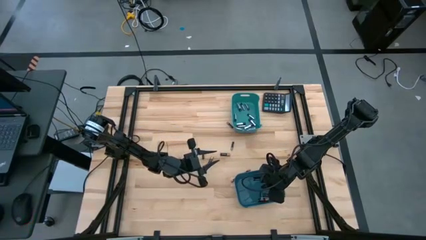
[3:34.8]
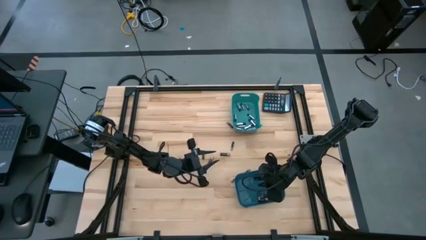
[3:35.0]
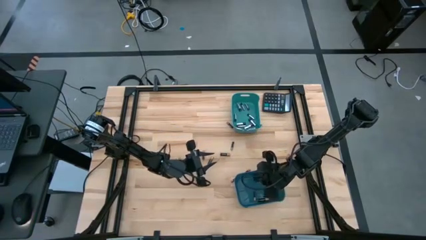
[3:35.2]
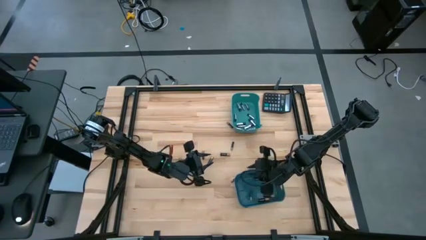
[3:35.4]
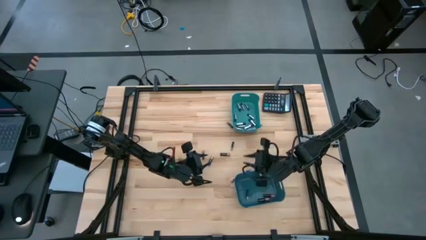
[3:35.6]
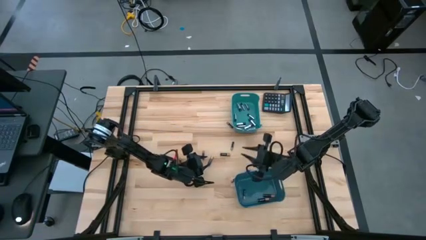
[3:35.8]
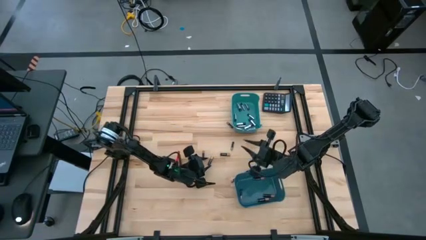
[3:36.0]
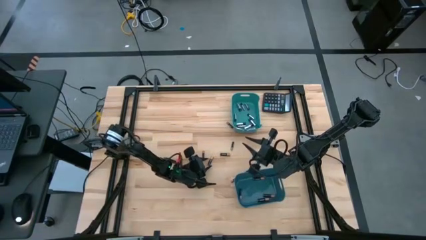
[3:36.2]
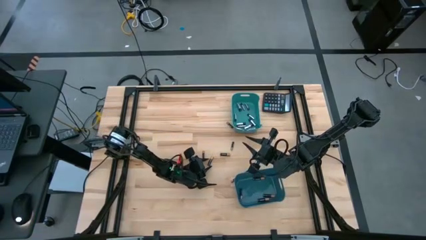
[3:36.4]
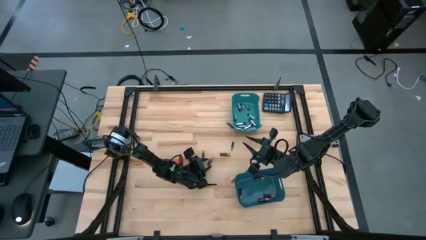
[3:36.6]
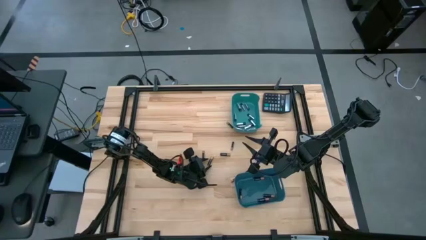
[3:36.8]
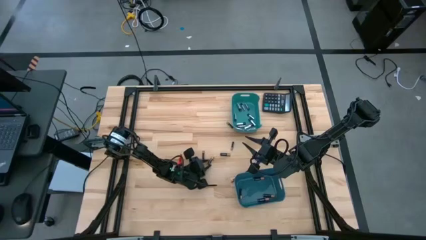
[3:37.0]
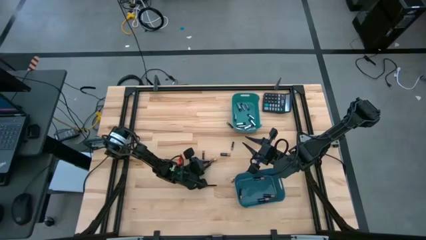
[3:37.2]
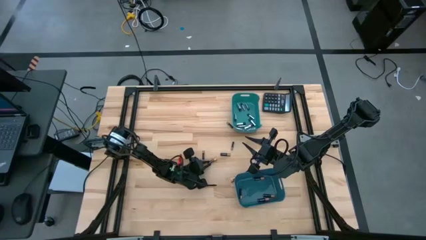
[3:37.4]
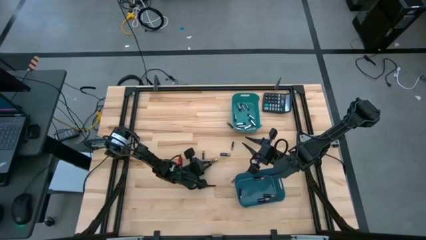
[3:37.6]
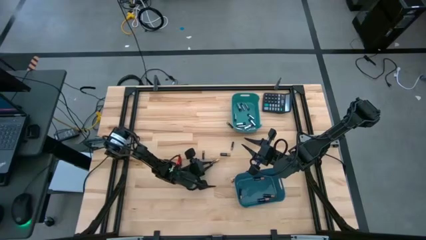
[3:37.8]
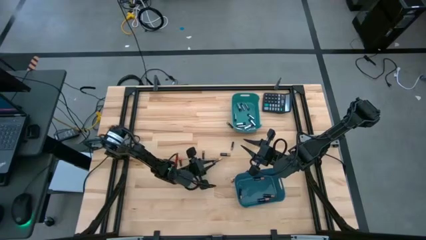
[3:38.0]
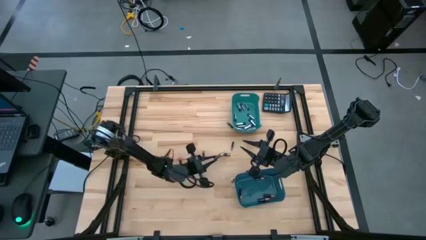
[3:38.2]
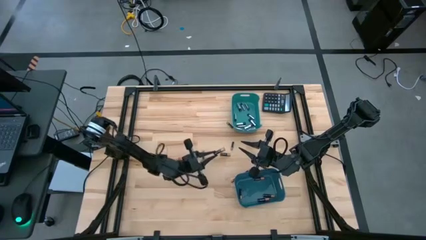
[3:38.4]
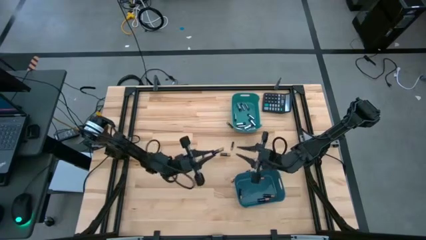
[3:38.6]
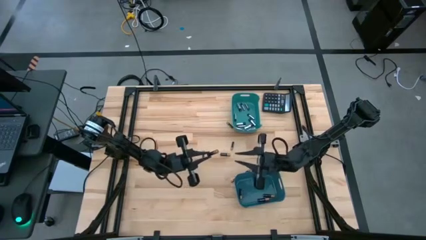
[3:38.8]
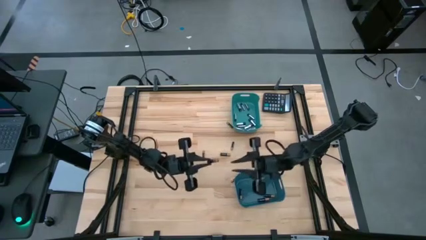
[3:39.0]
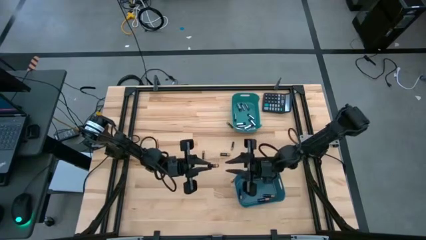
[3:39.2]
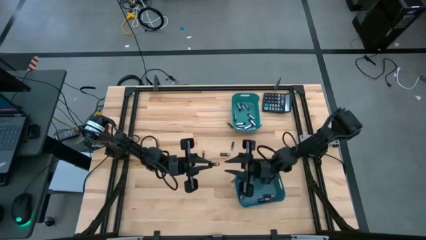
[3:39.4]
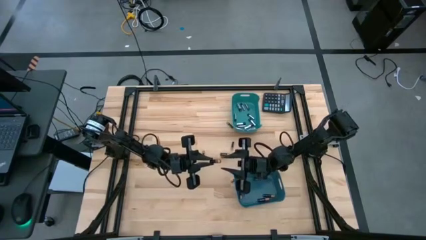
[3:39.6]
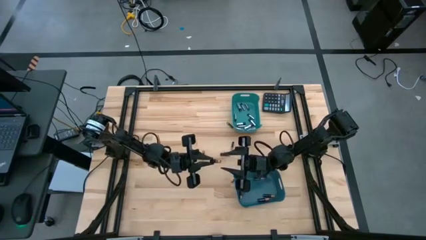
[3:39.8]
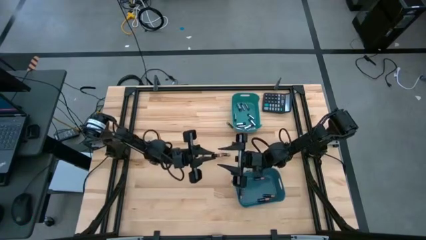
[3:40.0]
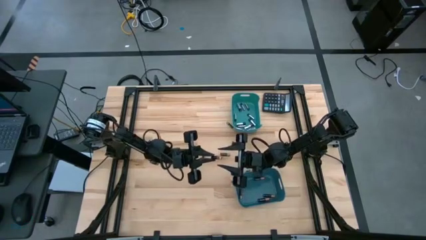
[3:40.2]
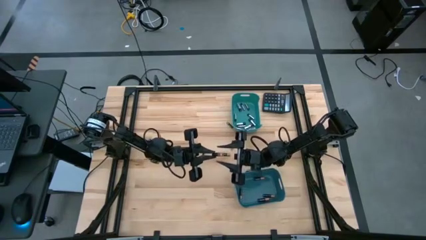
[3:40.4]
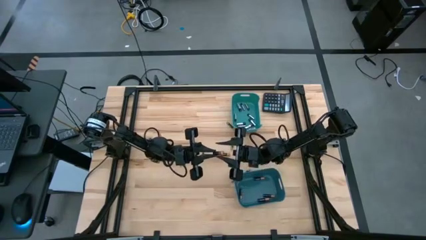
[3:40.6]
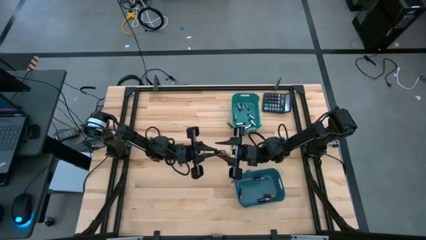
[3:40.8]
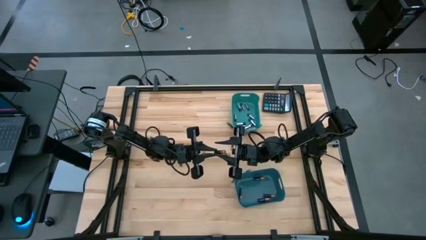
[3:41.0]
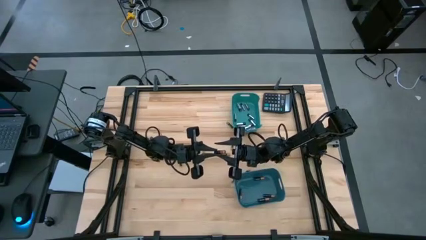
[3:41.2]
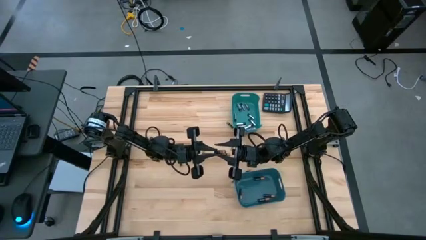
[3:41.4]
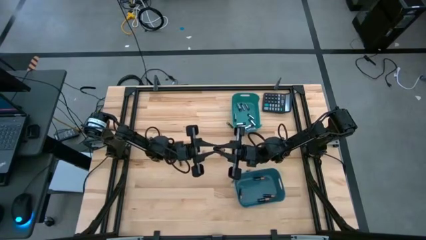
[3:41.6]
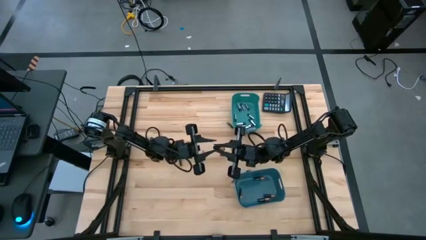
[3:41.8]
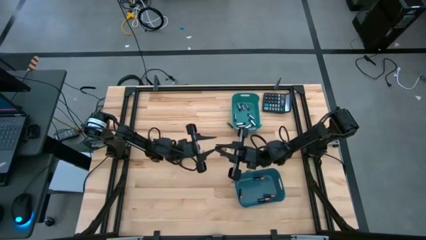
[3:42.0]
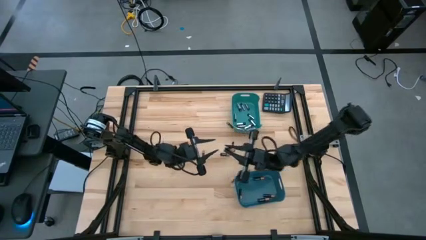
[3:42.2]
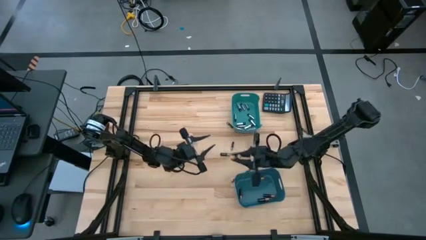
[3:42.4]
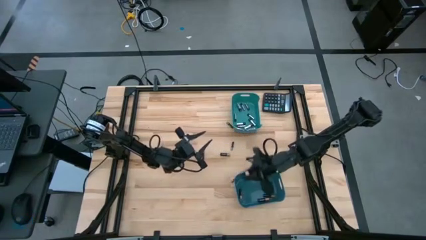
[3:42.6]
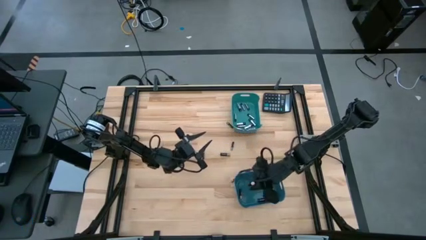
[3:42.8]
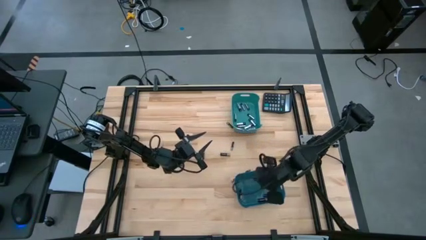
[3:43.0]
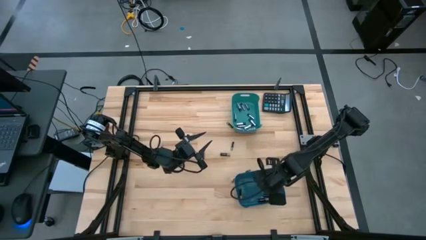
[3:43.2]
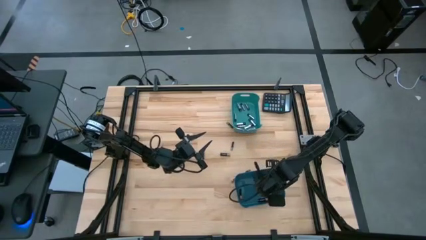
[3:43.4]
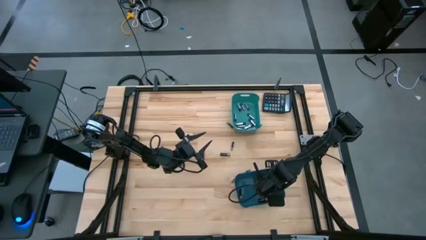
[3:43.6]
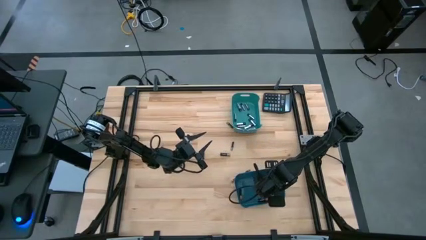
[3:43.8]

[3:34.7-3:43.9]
Task: Sort batteries
Put the black battery into the blue bin

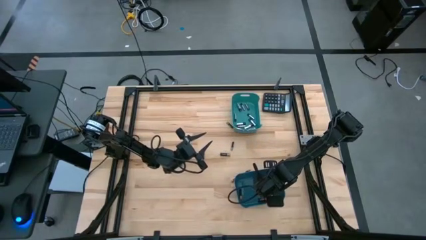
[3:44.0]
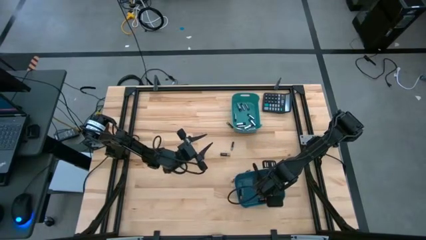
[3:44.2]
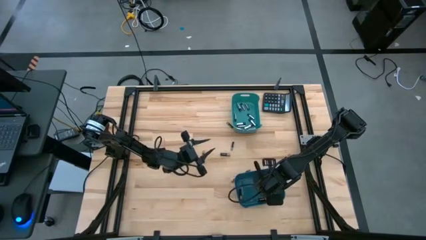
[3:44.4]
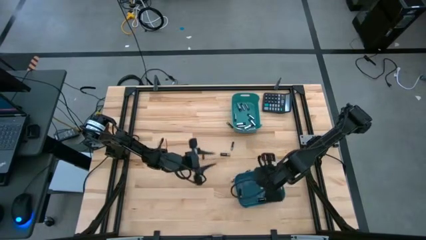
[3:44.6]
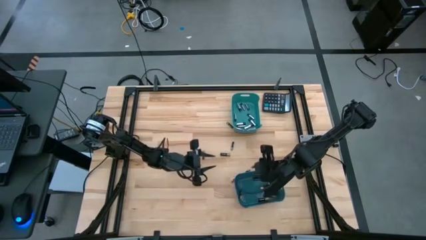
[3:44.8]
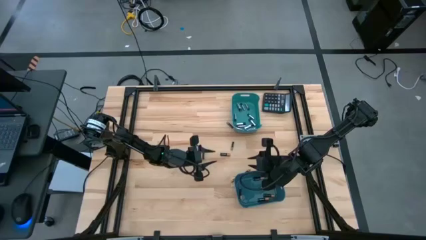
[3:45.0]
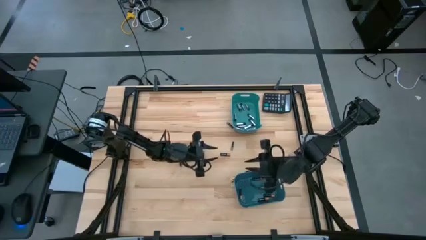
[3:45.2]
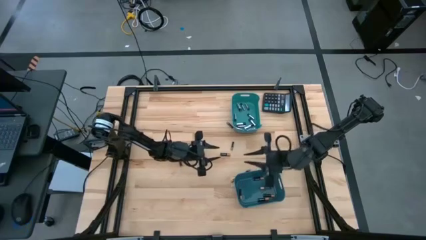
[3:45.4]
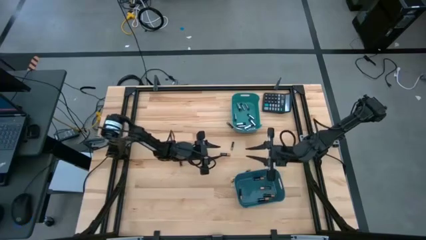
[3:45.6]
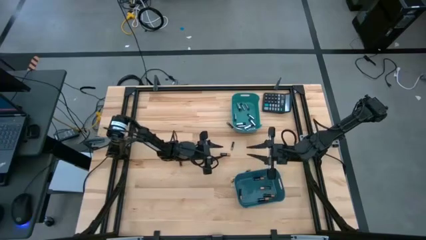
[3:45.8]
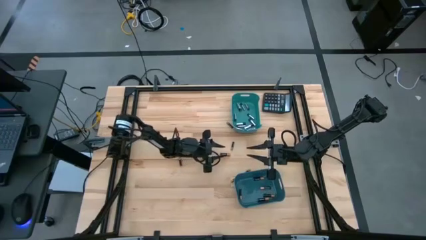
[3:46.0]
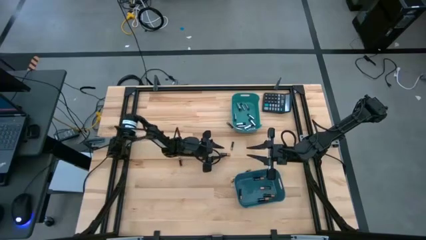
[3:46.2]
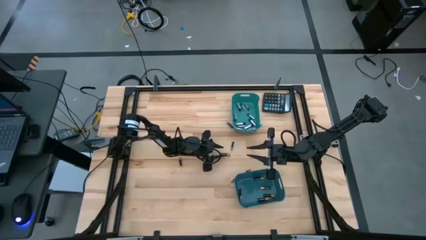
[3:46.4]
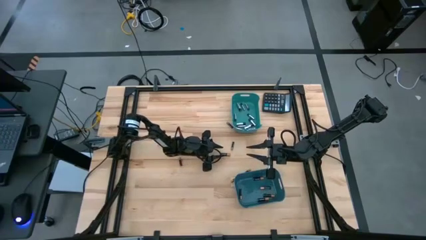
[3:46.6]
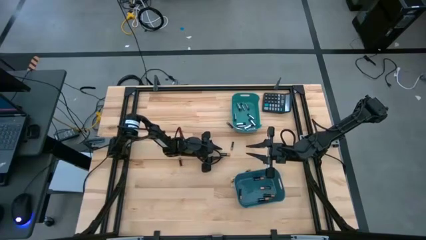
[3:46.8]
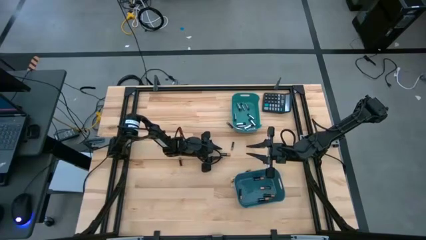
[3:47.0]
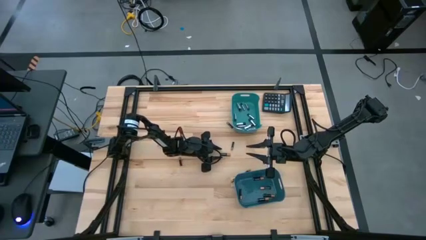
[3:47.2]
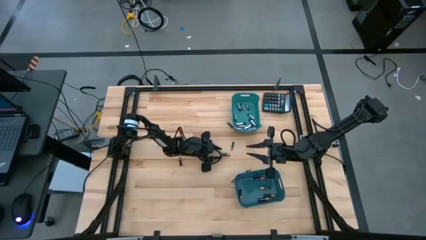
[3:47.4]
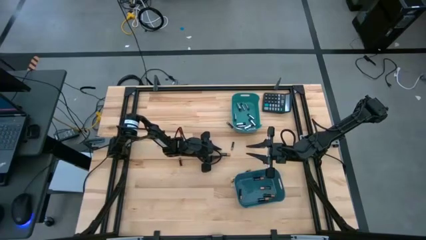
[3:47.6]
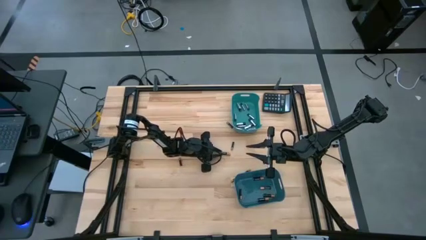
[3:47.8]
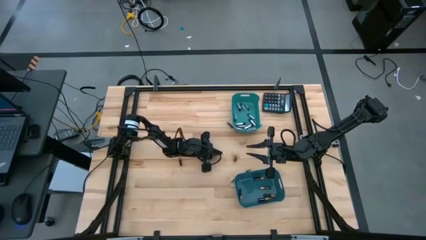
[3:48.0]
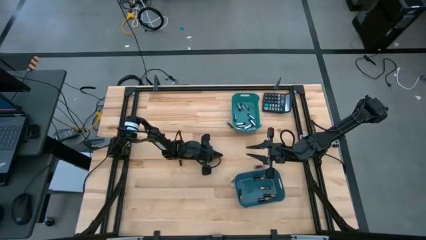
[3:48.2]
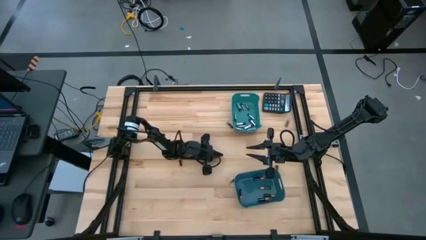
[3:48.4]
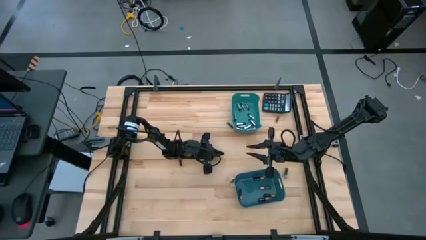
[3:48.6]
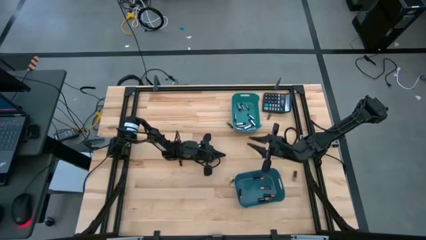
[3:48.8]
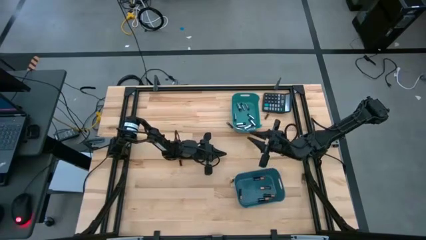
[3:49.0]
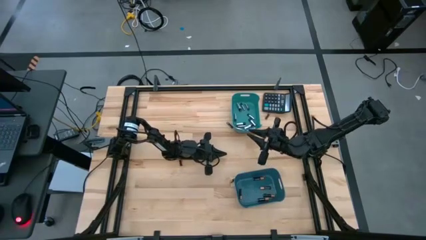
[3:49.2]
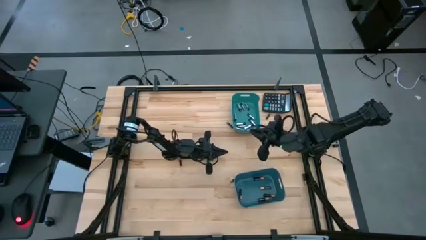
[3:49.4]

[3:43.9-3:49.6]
Put the black battery into the blue bin

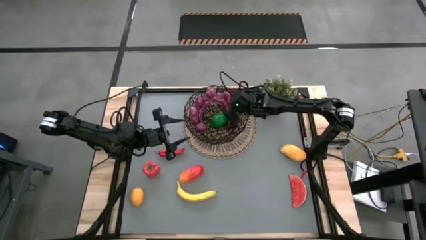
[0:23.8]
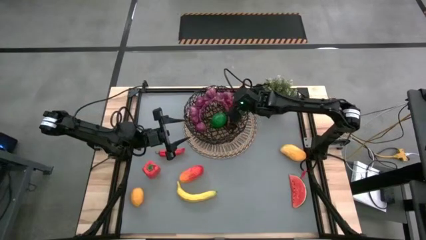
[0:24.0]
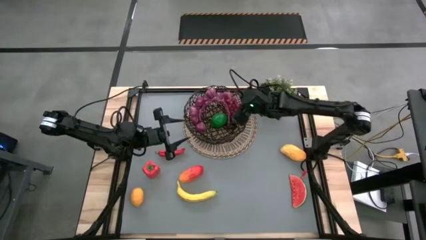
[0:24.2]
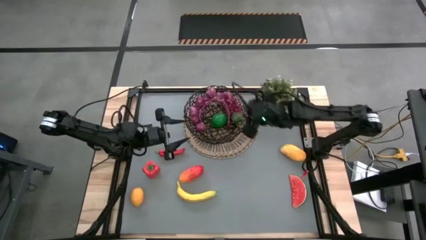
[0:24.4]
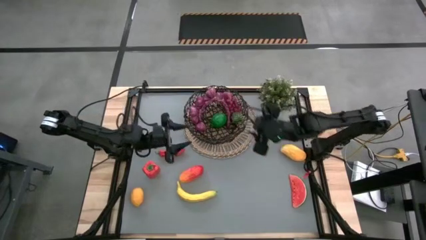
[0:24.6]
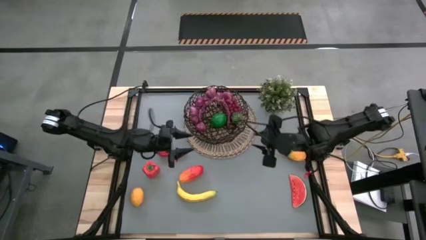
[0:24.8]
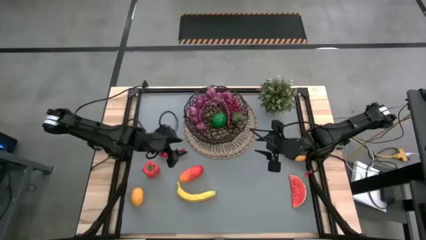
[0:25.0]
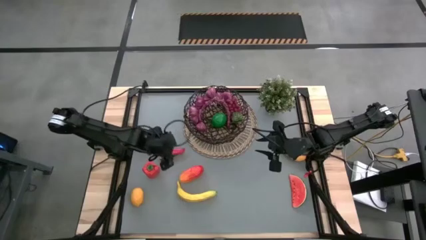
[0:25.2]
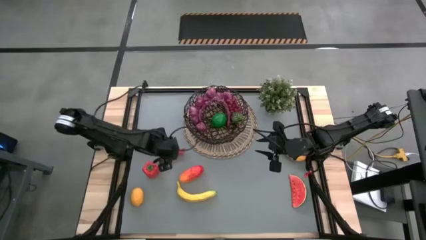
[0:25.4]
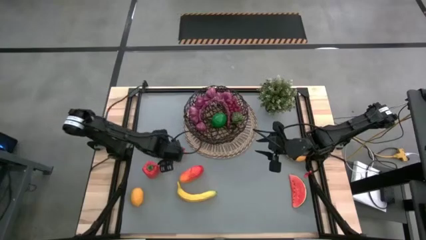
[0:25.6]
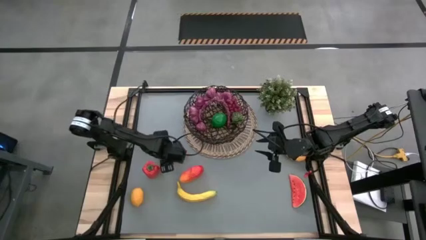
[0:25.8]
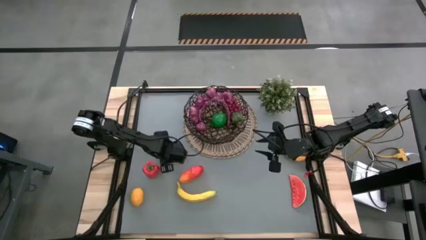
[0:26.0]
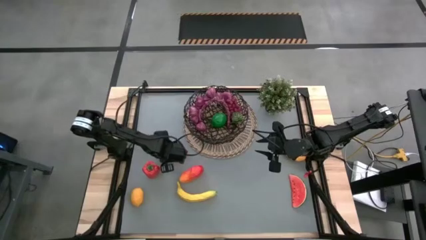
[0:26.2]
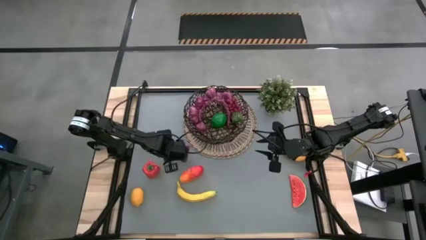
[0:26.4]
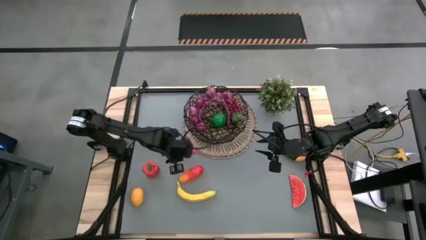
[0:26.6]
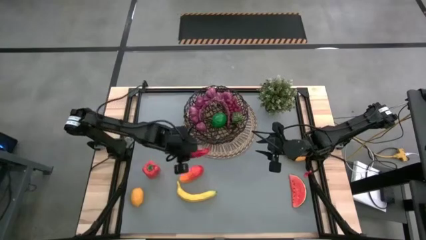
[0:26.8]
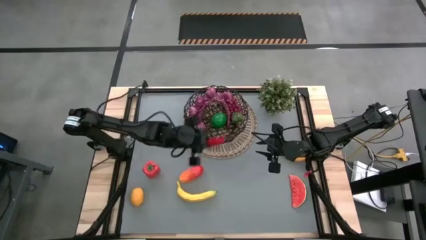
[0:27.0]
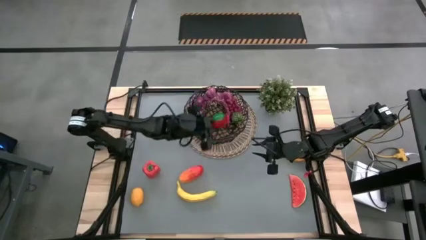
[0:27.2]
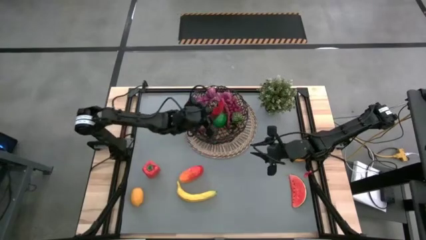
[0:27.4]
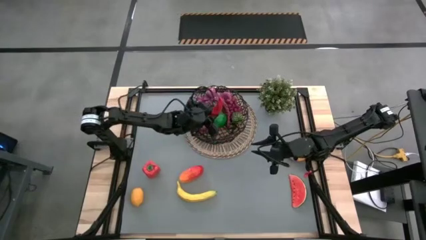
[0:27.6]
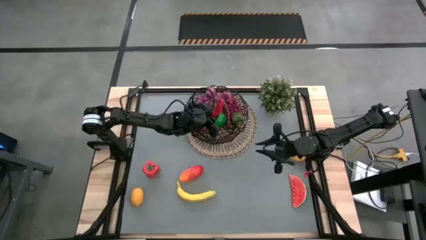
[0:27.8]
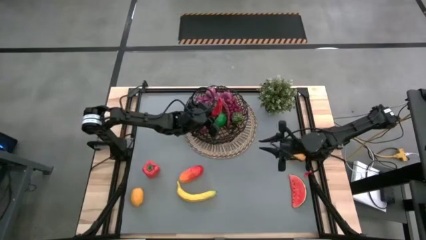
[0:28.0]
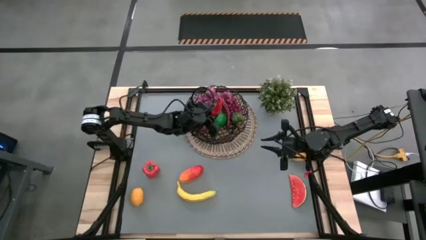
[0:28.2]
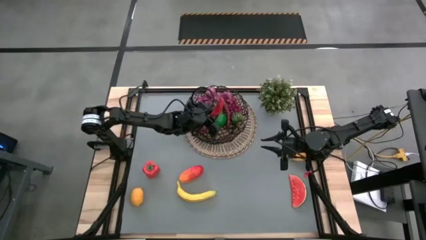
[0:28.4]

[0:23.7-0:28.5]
Task: Build produce basket
Put the red chili pepper into the basket
